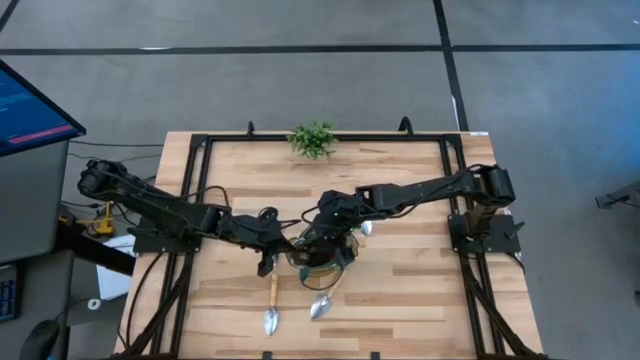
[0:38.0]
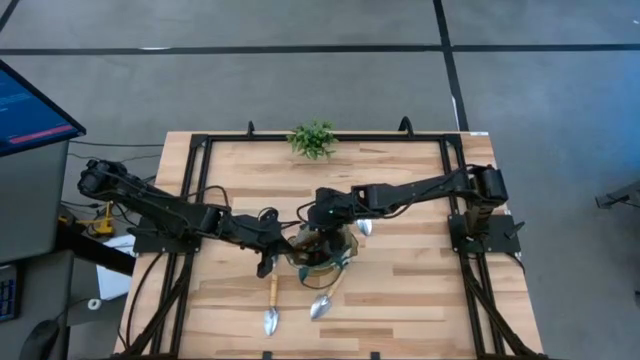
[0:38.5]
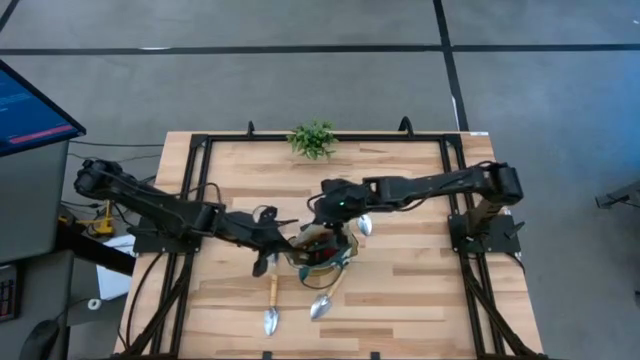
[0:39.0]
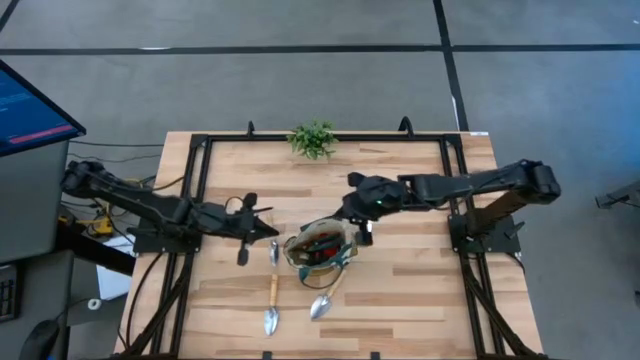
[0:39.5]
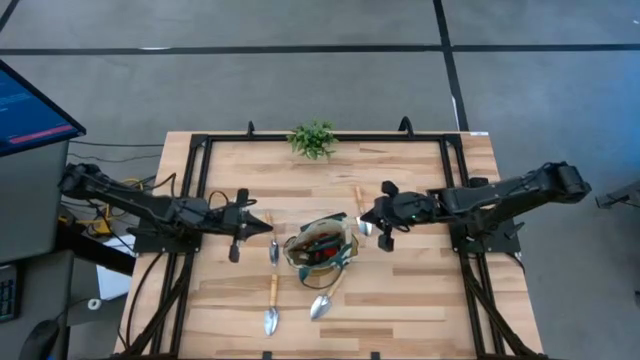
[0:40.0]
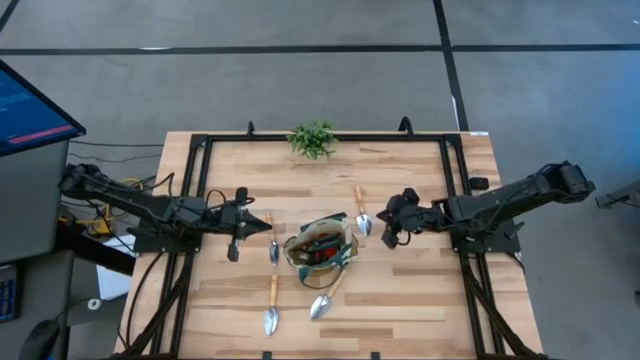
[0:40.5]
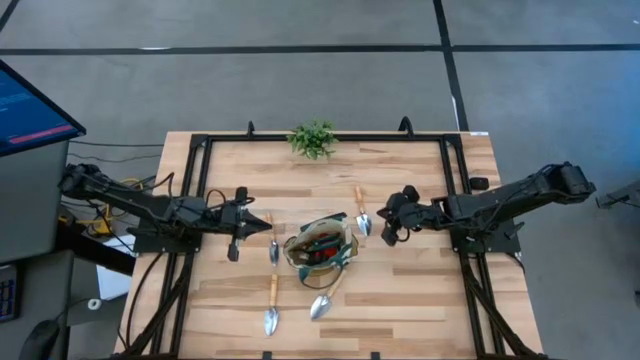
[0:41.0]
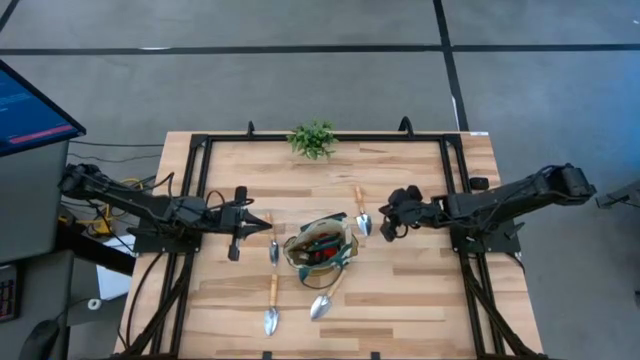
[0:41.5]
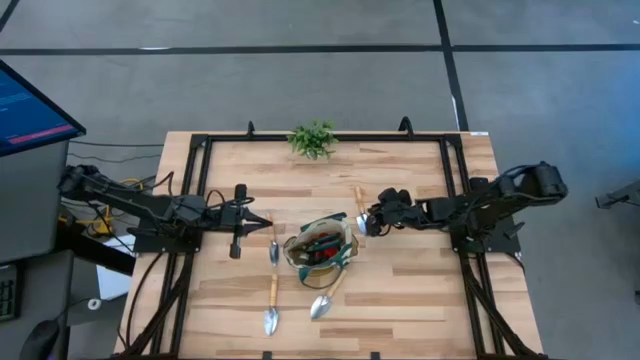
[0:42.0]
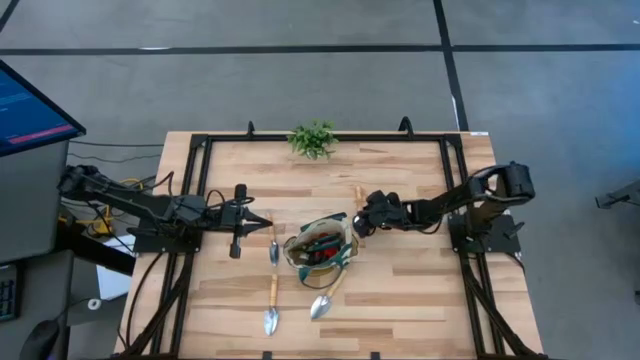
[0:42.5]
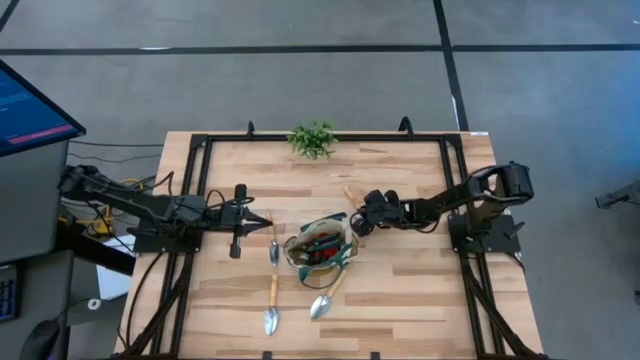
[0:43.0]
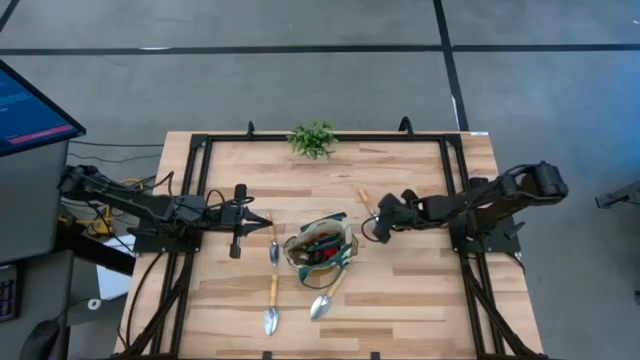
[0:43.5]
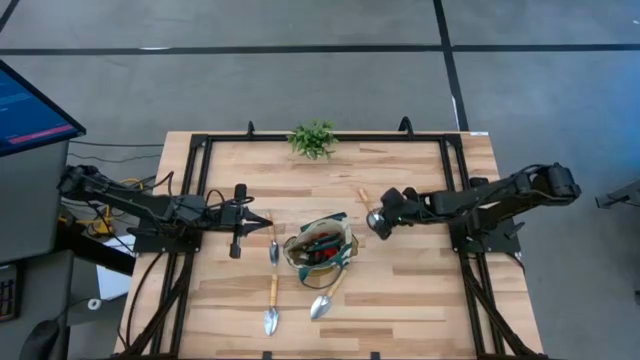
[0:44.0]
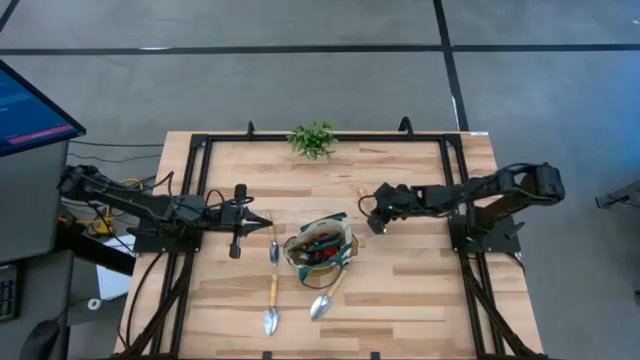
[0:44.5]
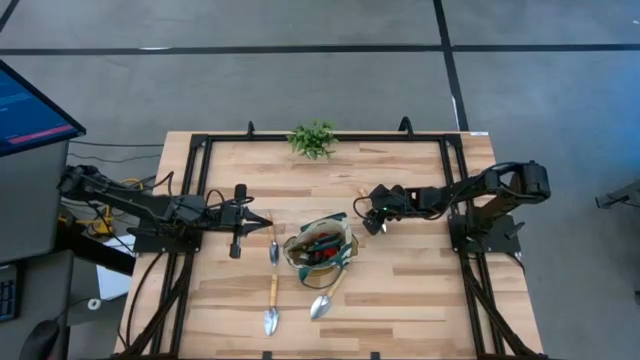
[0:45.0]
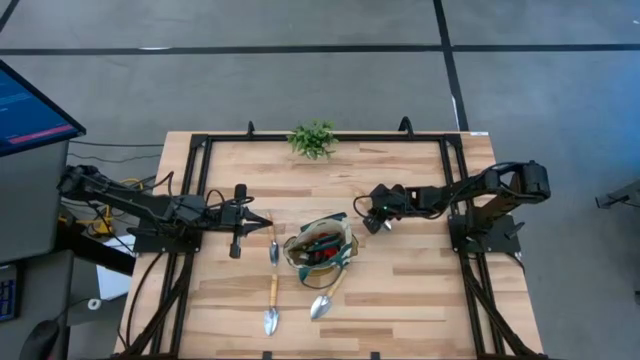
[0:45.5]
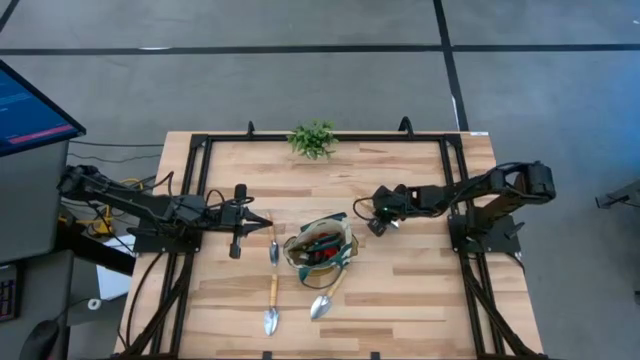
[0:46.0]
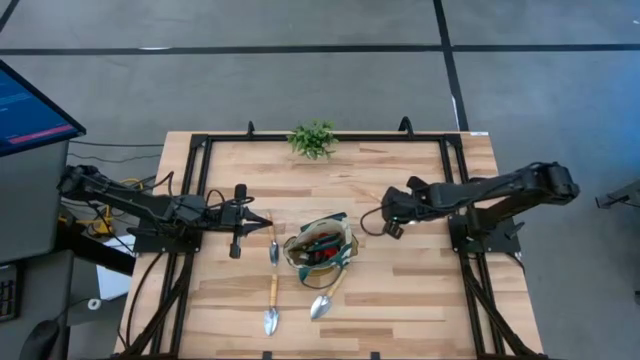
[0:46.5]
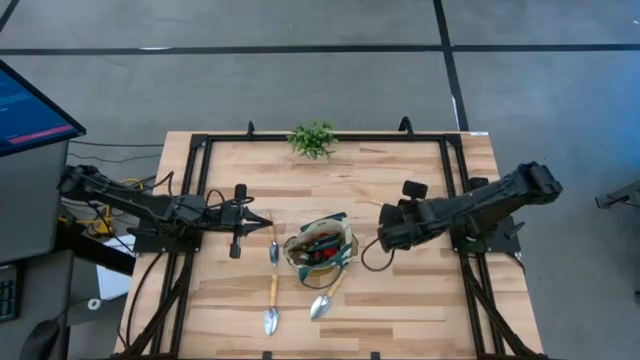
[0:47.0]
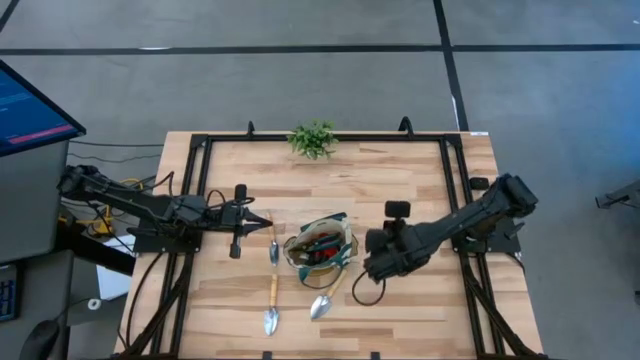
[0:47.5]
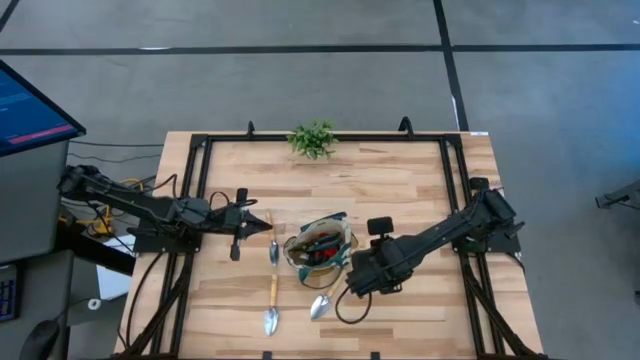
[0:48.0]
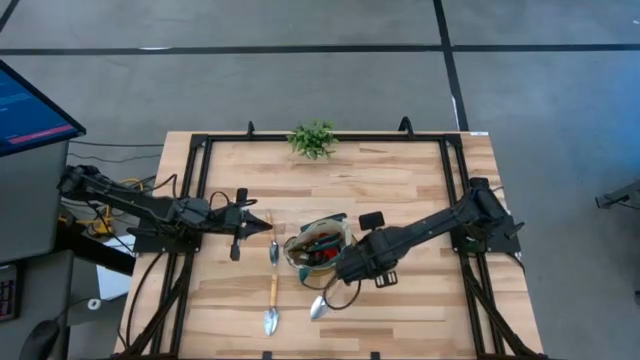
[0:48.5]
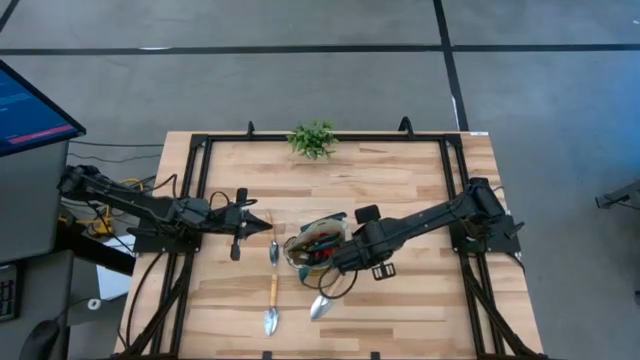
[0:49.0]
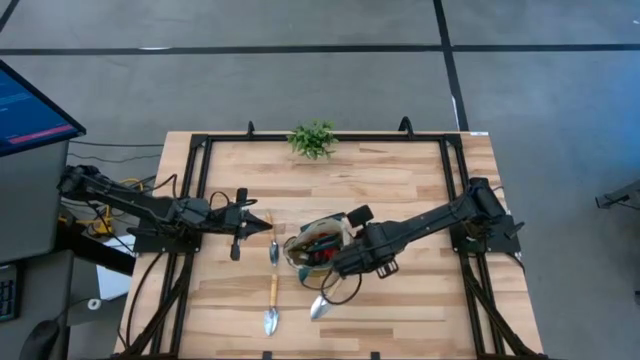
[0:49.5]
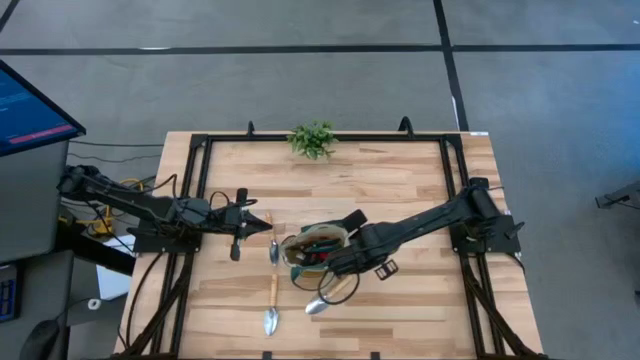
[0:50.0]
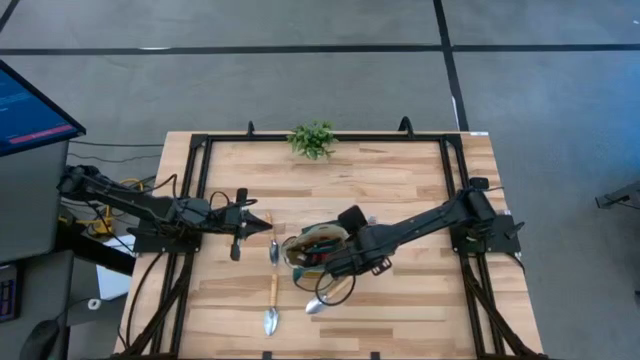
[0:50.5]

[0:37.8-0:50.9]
Task: Pick & Place Garden tools in Gardening bag
Put the top right trowel into the gardening bag

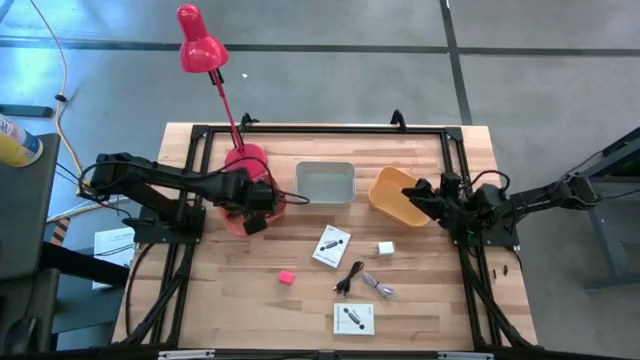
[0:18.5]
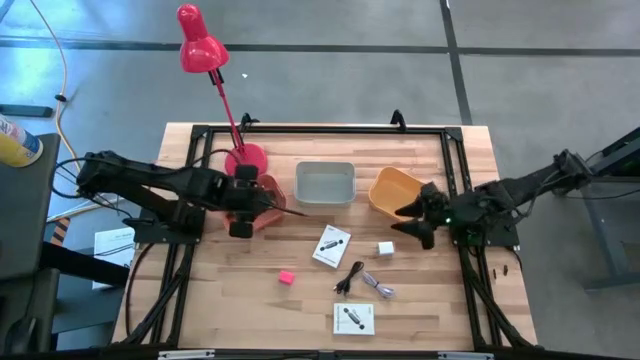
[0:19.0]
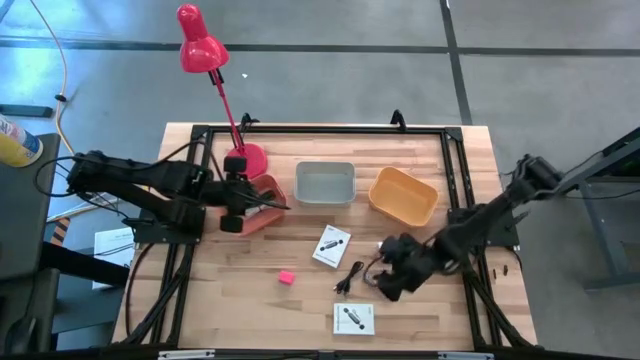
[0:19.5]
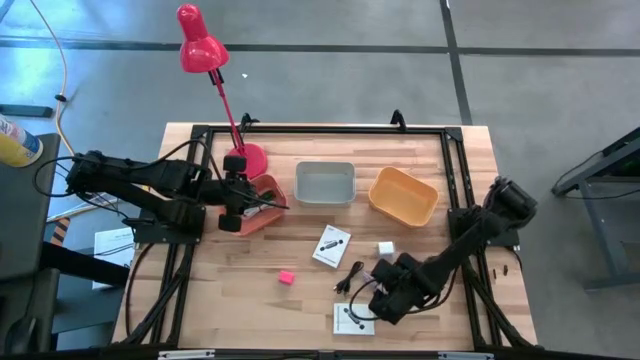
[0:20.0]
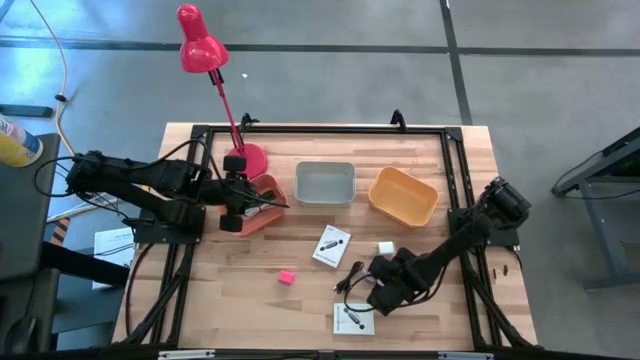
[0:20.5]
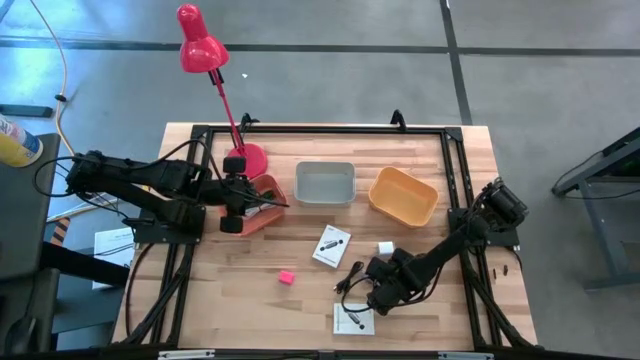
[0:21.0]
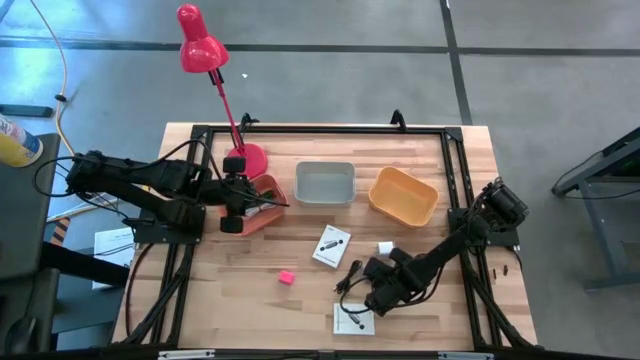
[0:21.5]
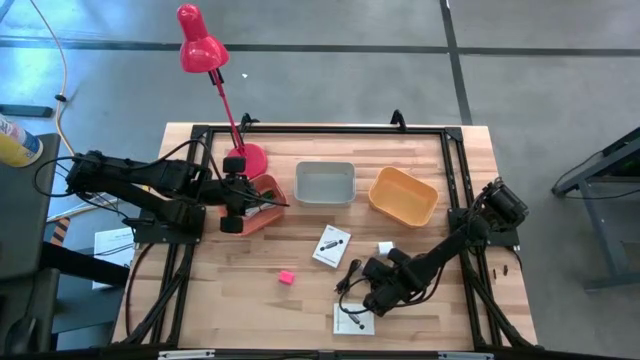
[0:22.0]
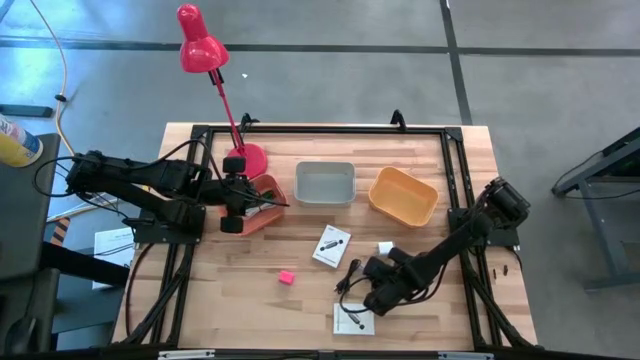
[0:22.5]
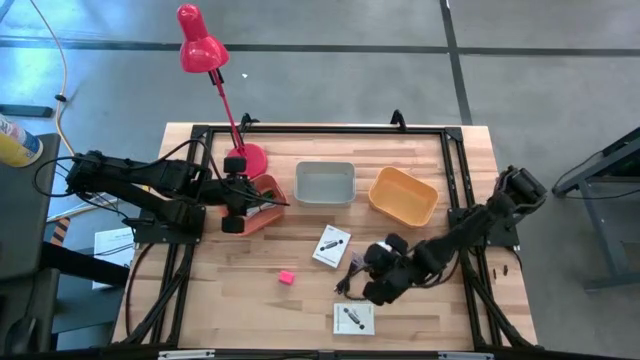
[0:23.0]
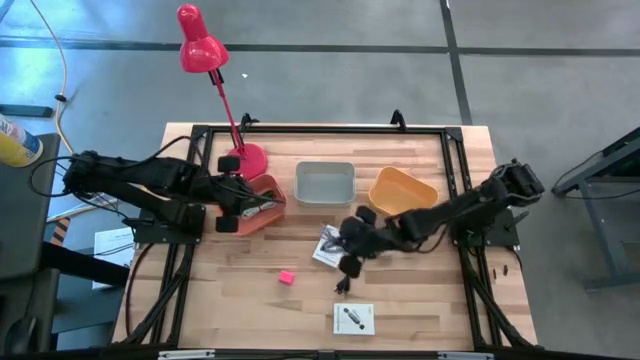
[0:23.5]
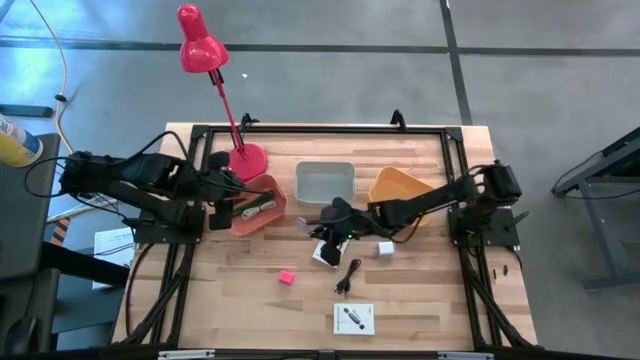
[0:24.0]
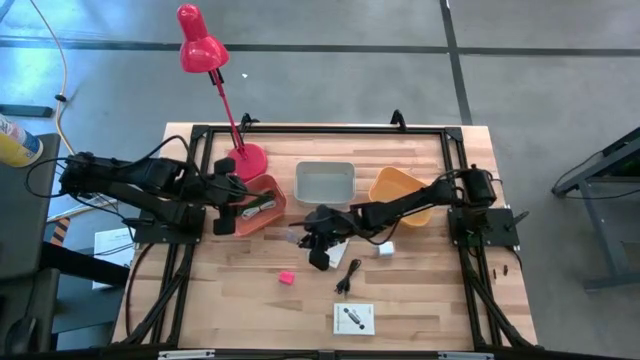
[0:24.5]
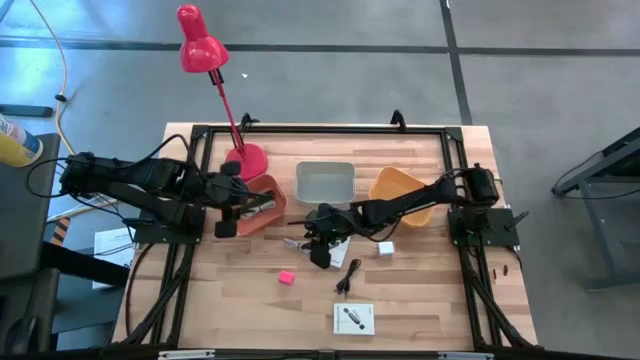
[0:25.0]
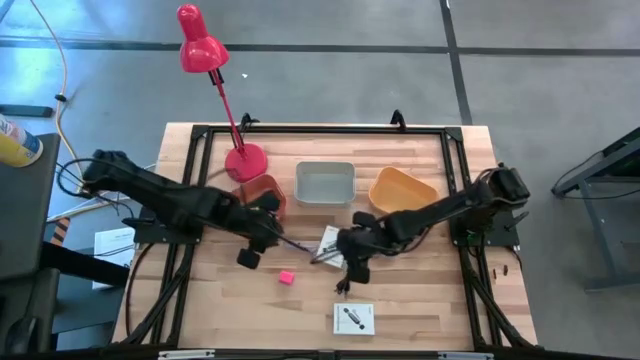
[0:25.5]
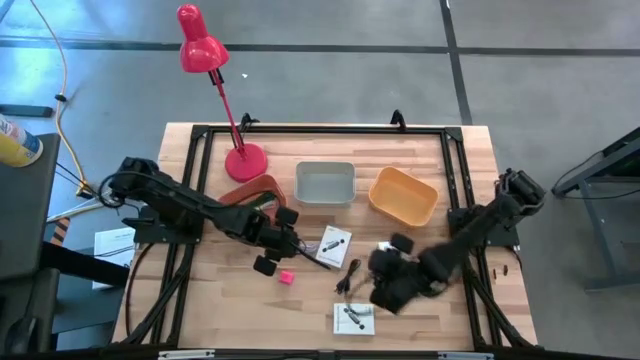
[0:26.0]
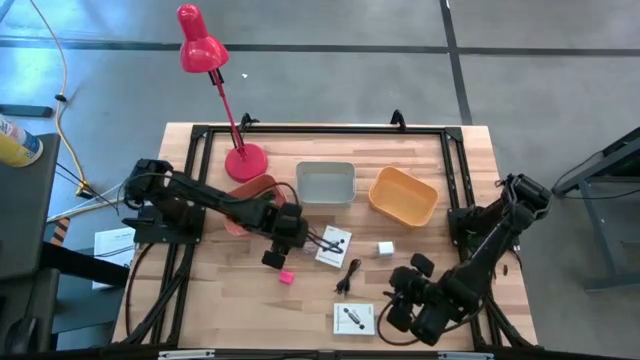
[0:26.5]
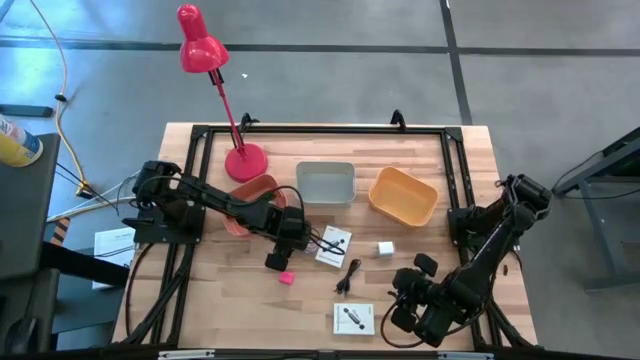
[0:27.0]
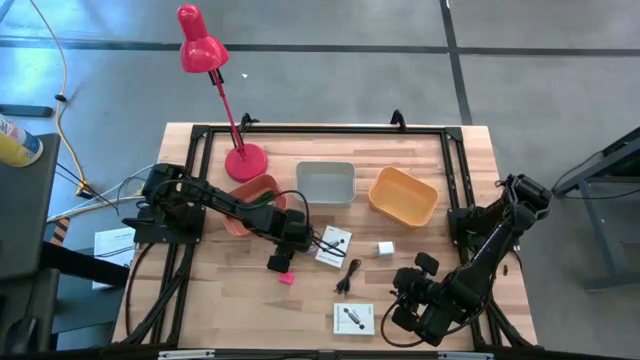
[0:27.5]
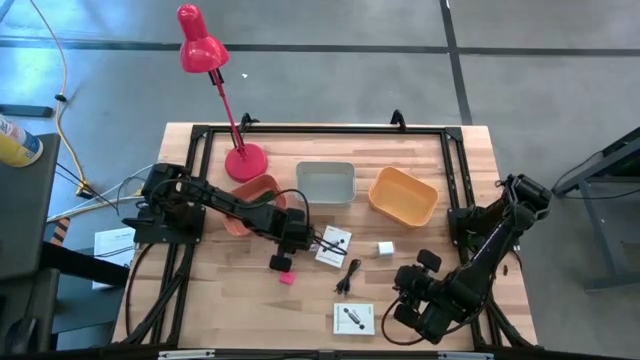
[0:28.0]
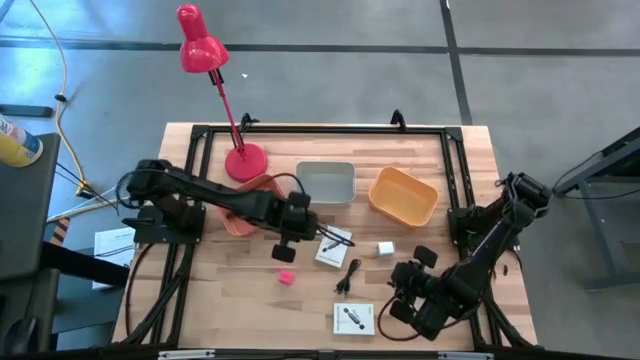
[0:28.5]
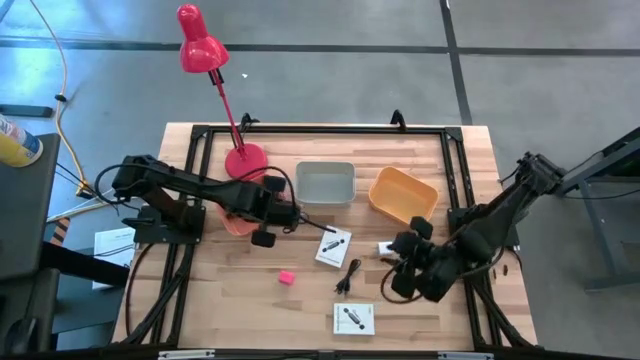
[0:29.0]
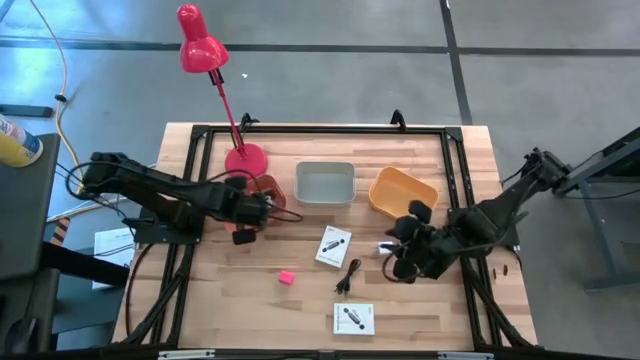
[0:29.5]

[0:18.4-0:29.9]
Task: Pick and place items into bin
Put the violet charger cable into the dark brown bin
